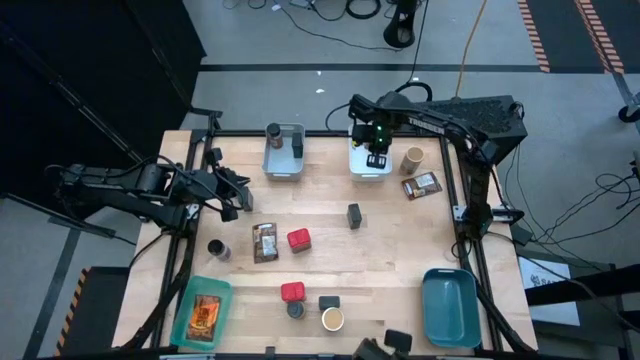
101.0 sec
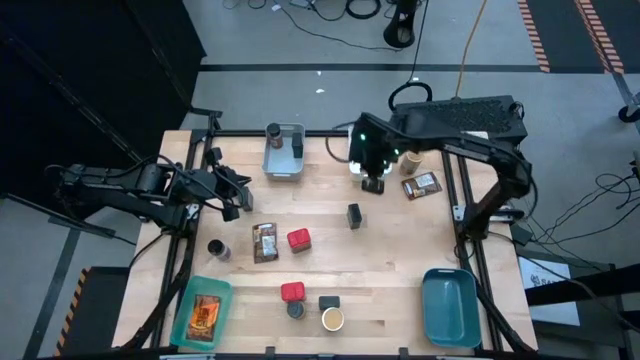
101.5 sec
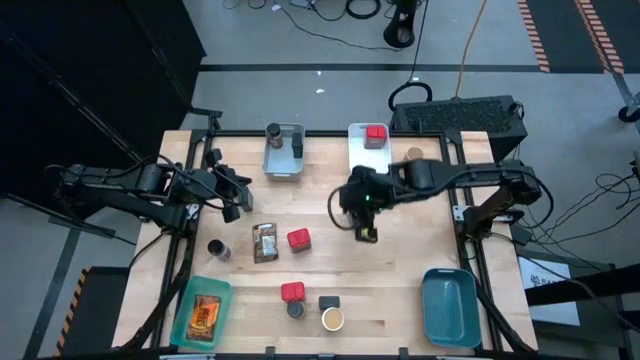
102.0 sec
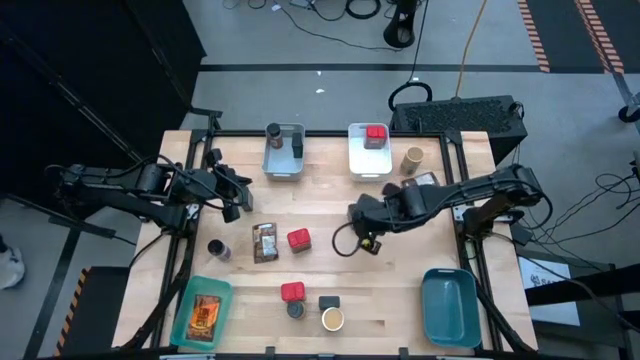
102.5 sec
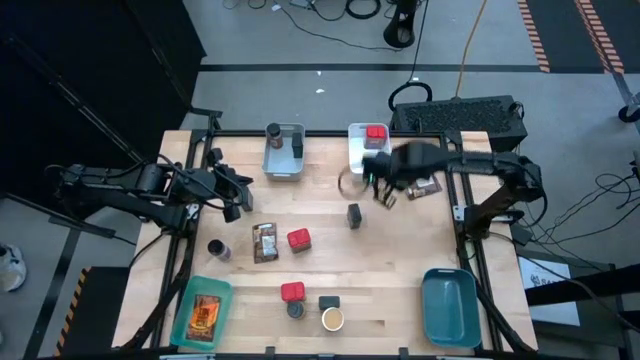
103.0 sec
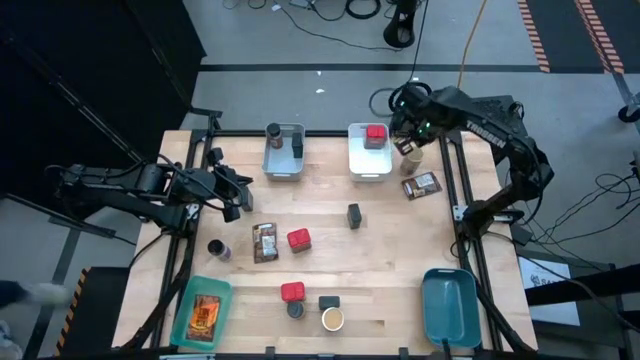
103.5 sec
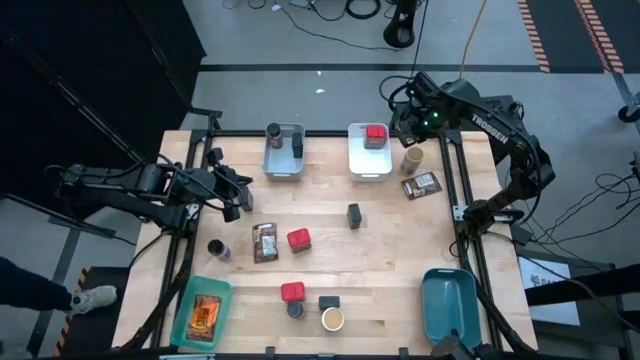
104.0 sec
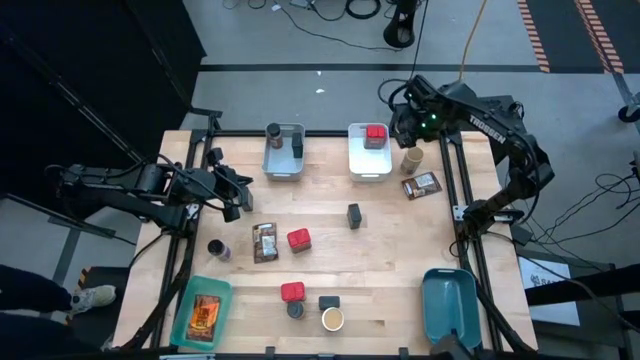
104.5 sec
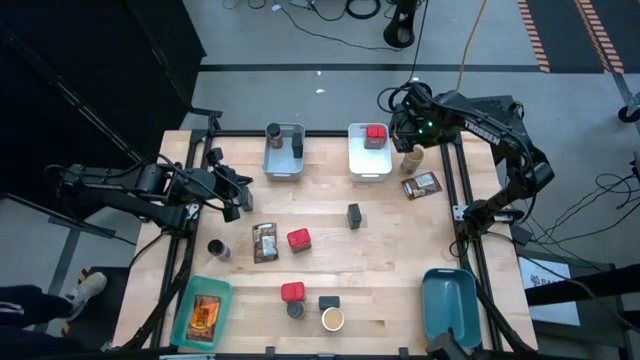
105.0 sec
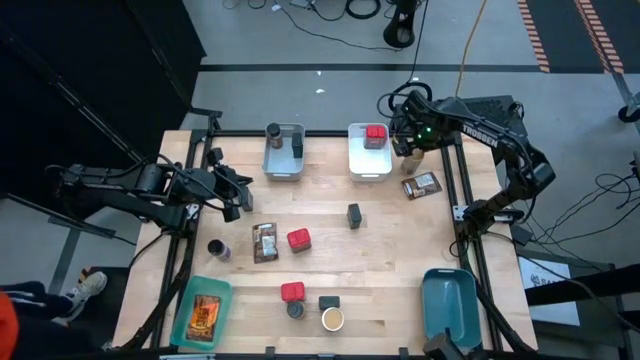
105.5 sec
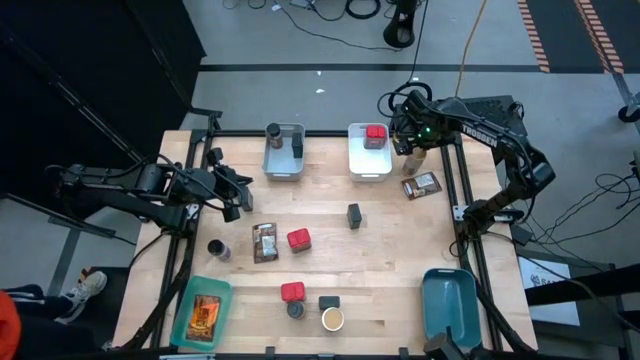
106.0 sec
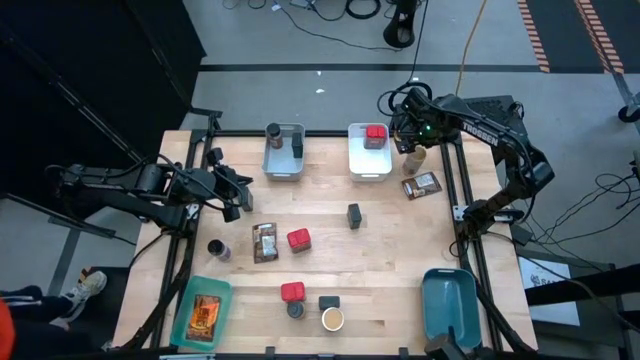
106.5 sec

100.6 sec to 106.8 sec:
Task: Sort spices by type
Put the gold spice bottle into the blue bin

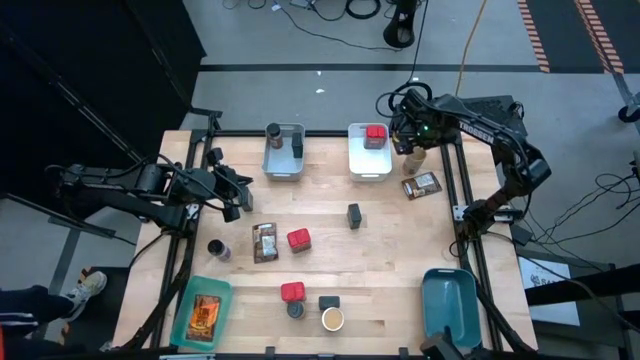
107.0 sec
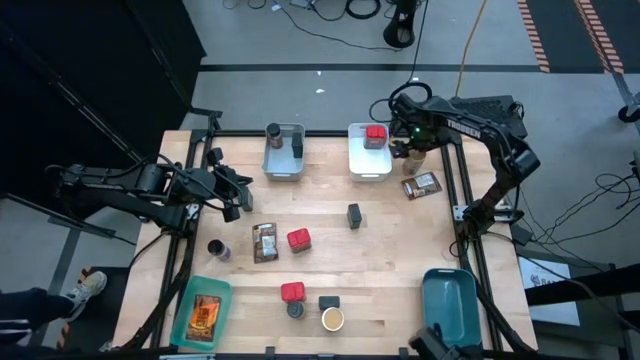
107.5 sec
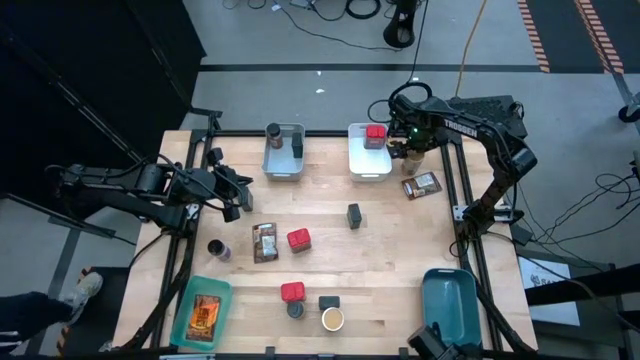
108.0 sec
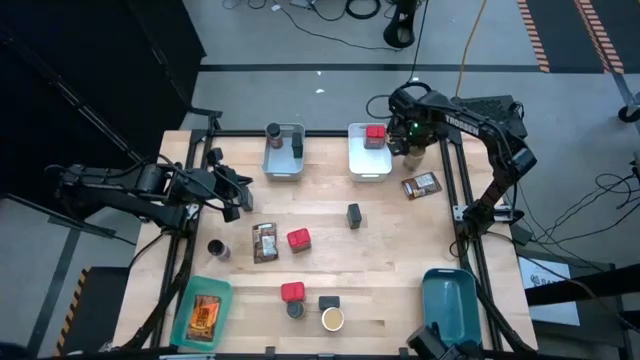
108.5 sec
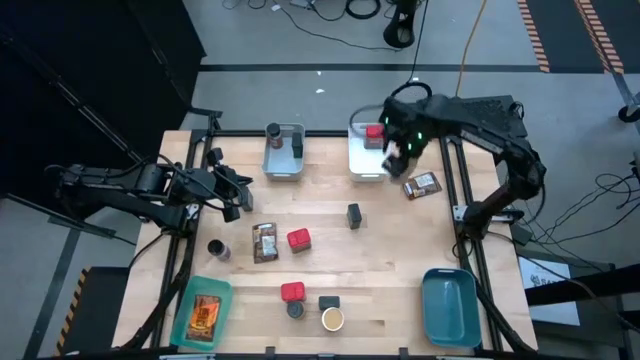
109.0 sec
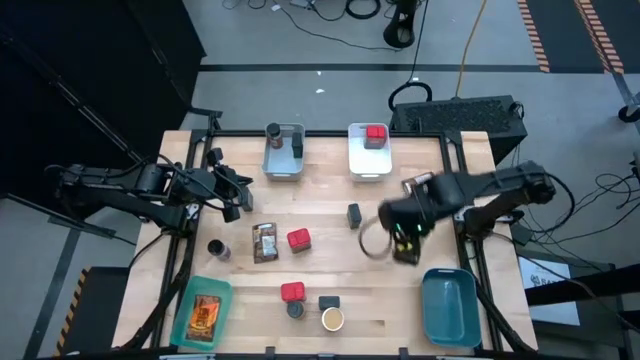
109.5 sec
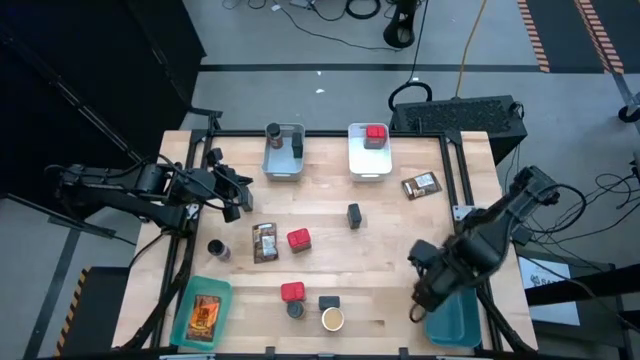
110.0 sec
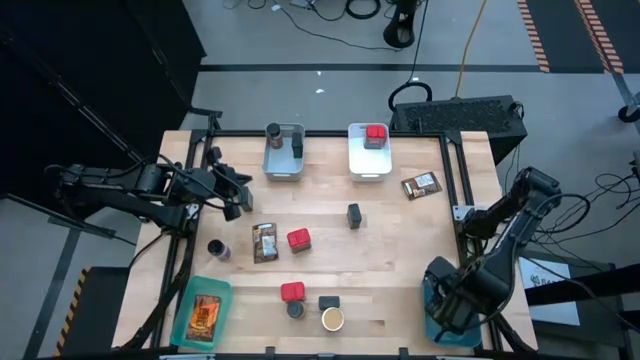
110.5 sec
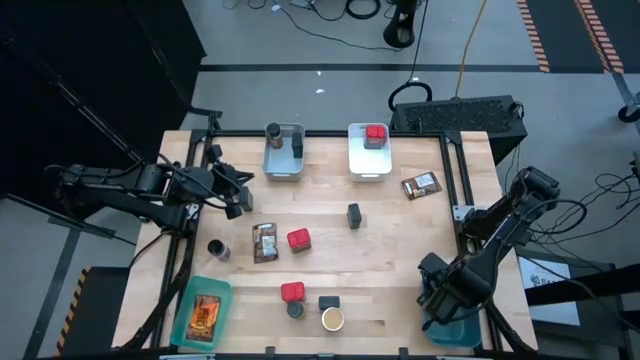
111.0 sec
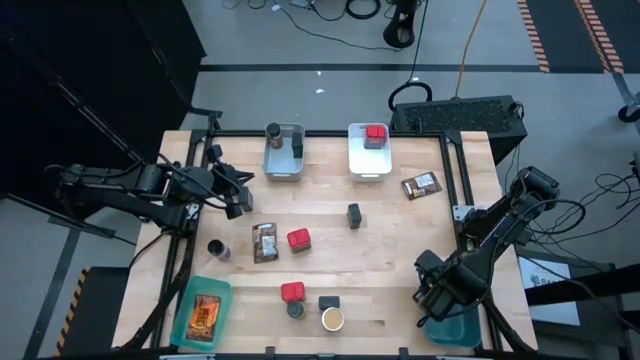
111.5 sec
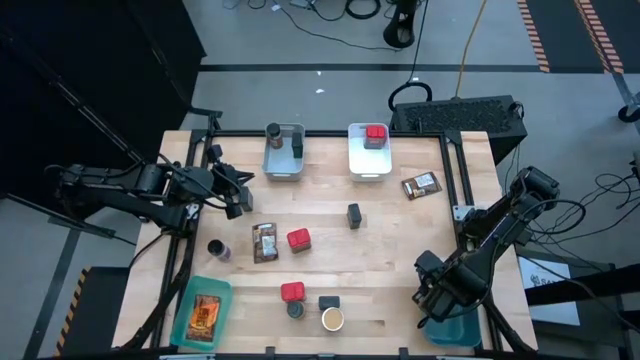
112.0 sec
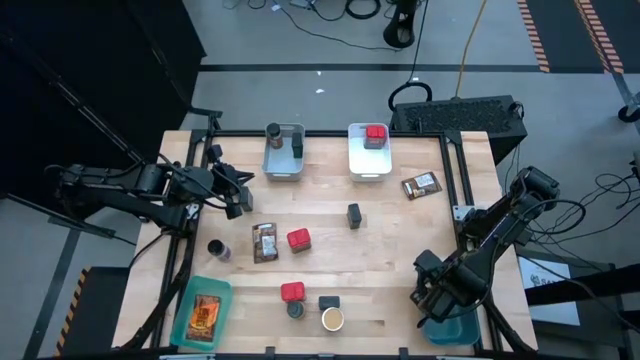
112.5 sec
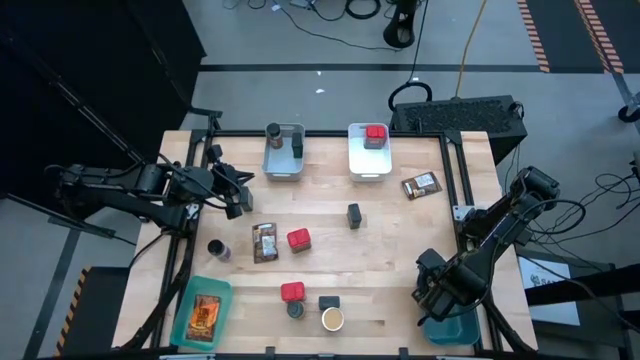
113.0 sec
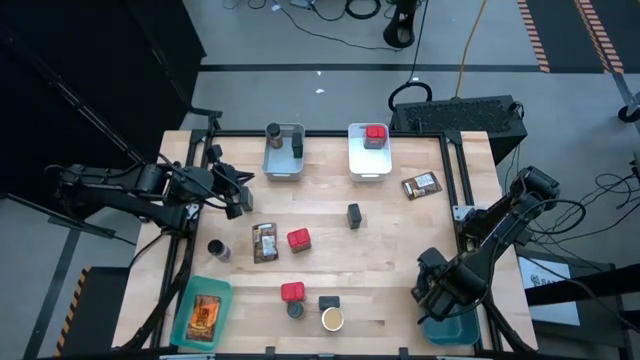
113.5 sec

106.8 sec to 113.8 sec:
Put the gold spice bottle into the blue bin

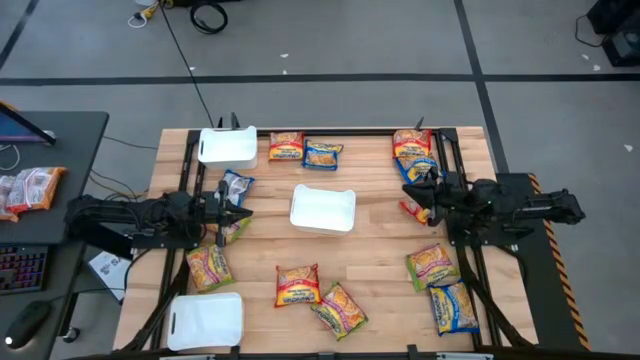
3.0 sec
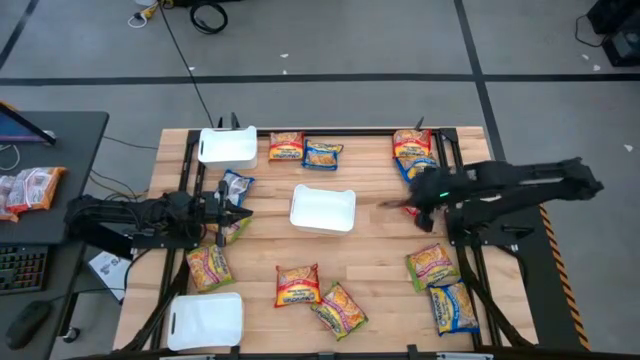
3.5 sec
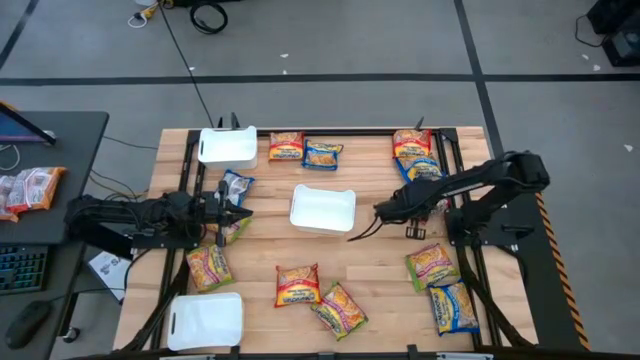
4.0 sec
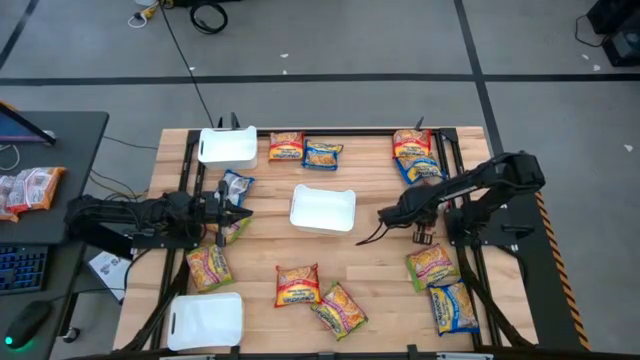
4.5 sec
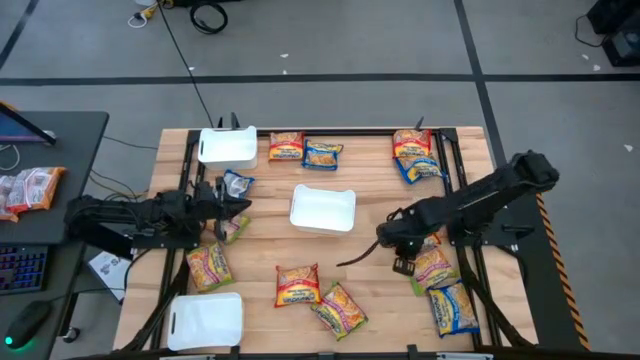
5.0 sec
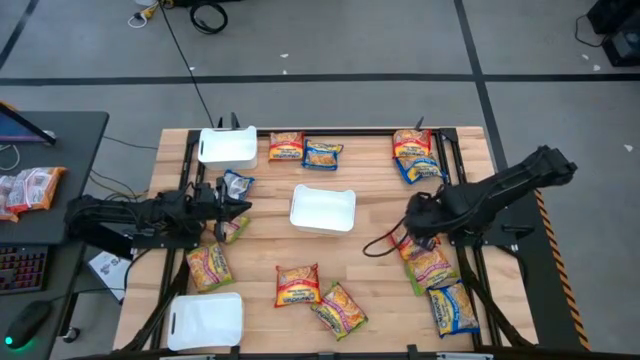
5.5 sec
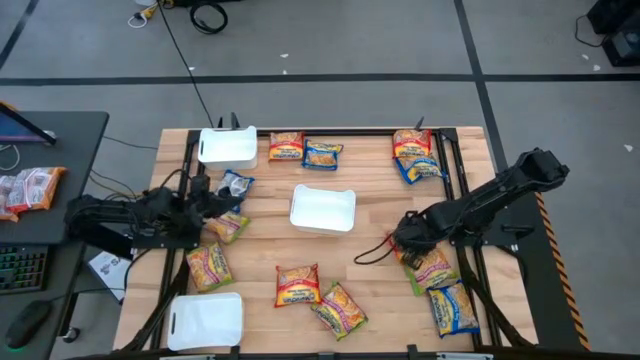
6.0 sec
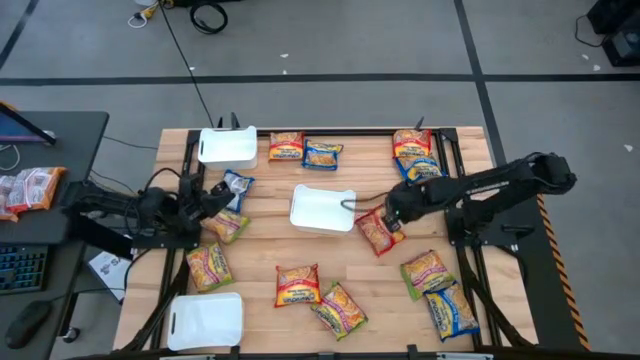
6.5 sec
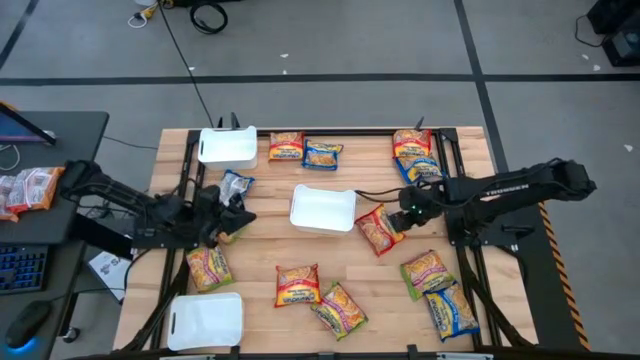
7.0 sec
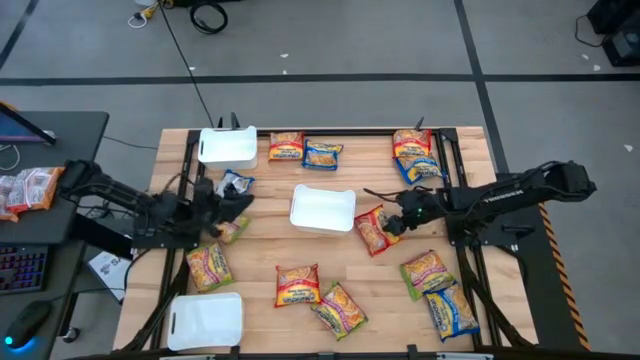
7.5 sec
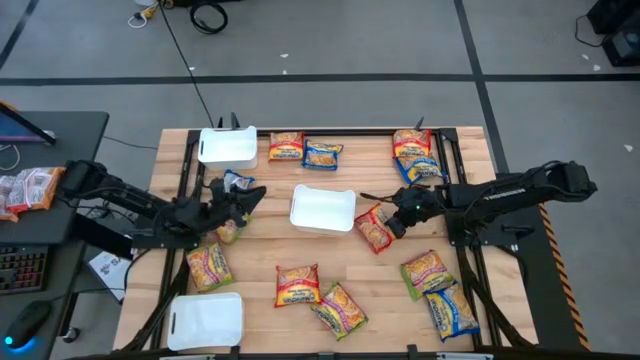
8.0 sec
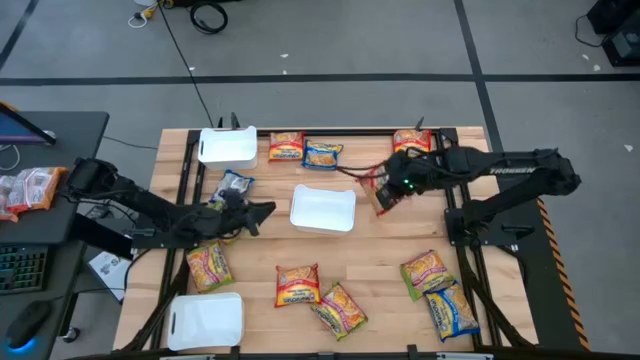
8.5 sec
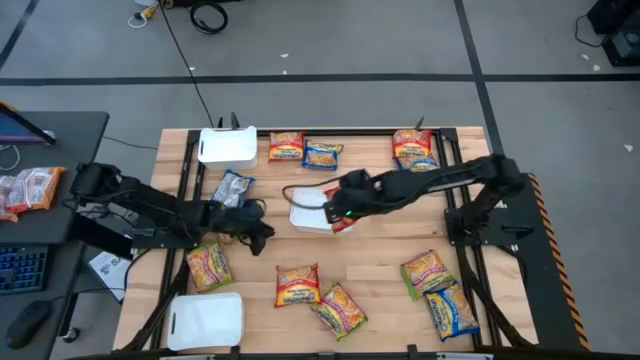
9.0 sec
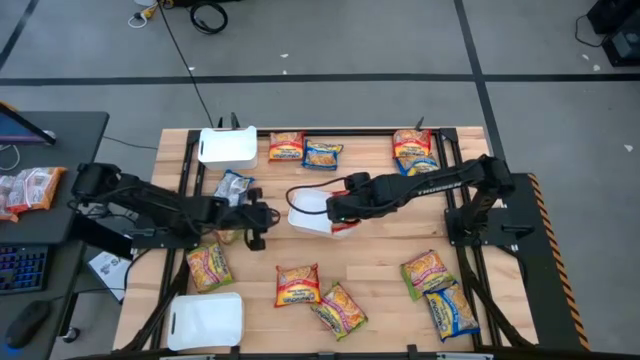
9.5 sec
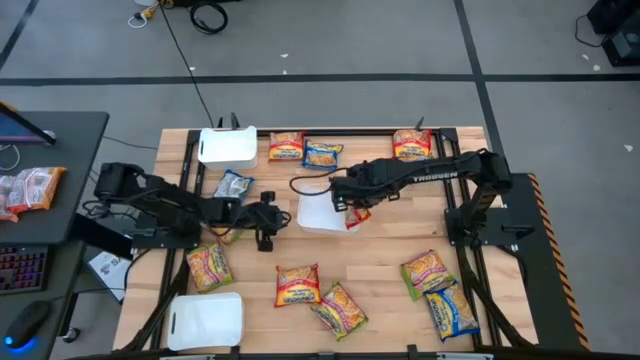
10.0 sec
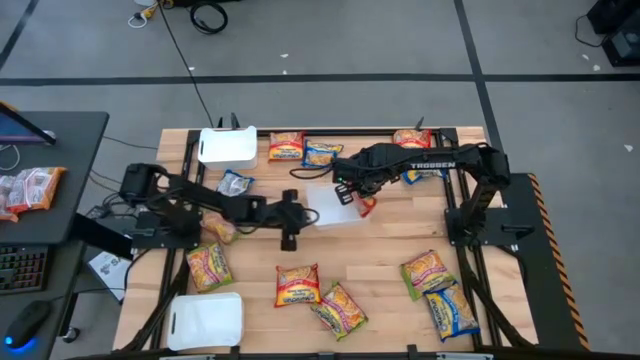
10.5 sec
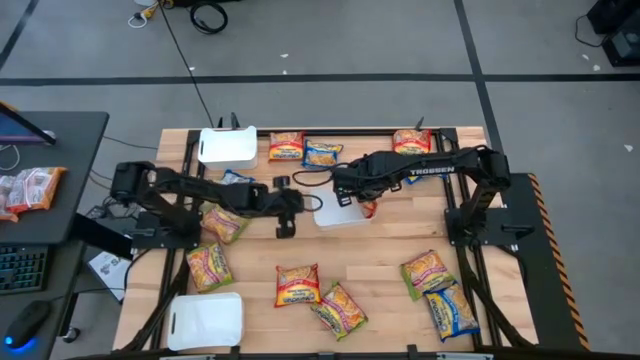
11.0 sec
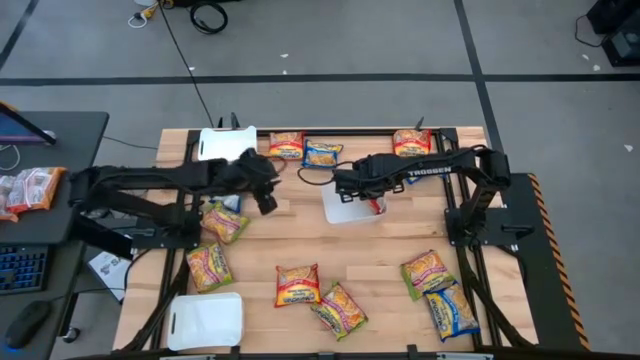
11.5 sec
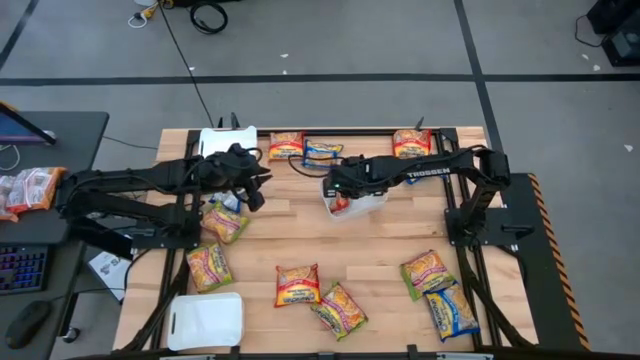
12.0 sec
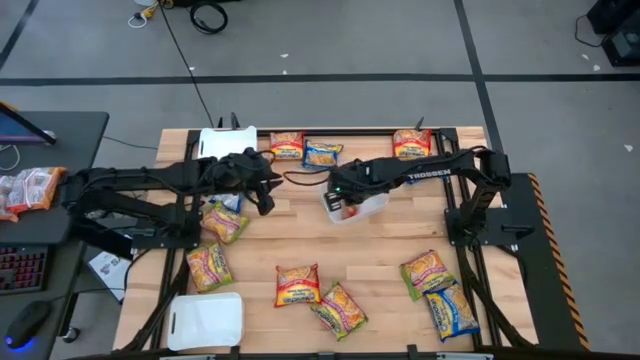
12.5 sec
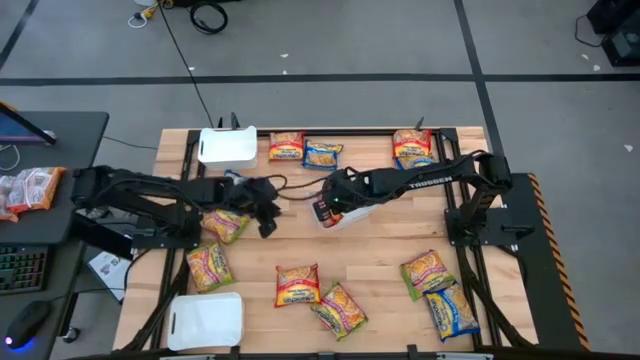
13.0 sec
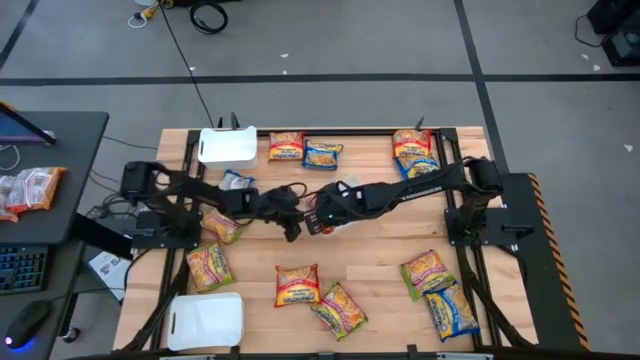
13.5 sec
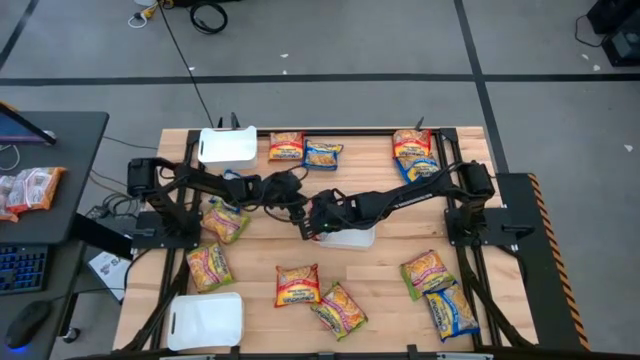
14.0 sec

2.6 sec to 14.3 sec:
Task: Sort Maruchan noodles
Put the orange noodle pack into the middle white bin
